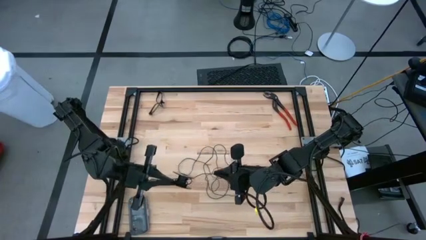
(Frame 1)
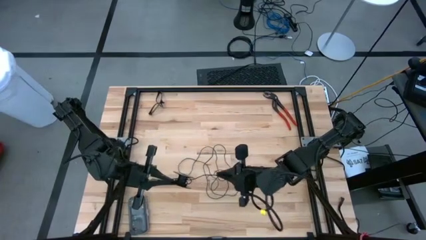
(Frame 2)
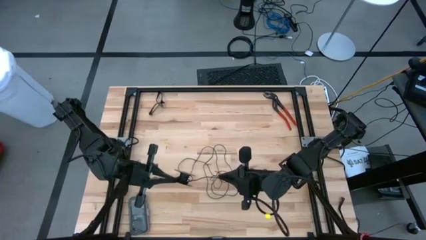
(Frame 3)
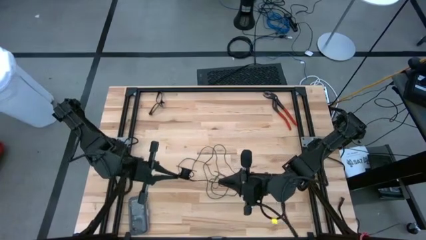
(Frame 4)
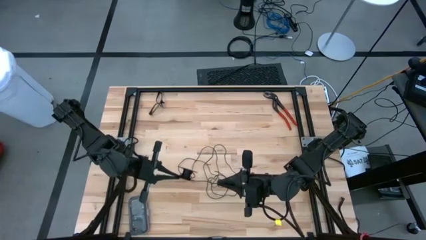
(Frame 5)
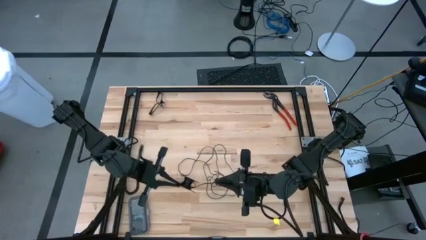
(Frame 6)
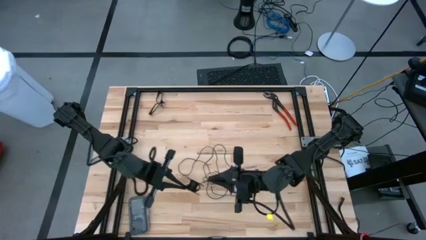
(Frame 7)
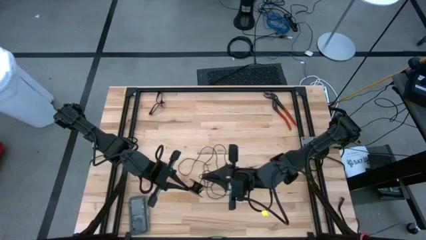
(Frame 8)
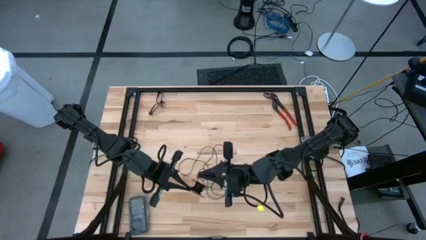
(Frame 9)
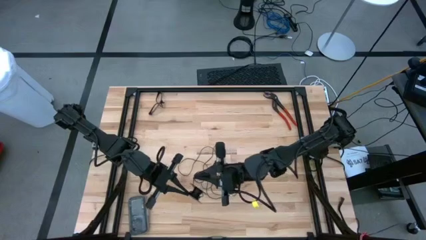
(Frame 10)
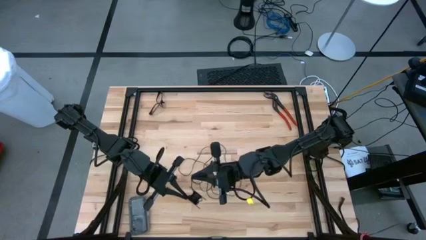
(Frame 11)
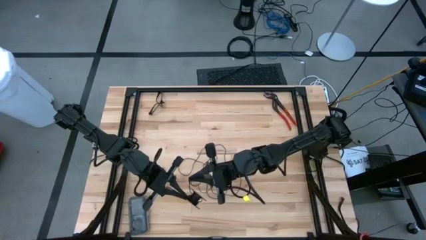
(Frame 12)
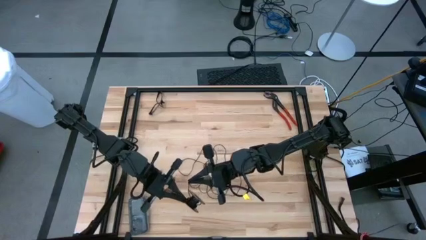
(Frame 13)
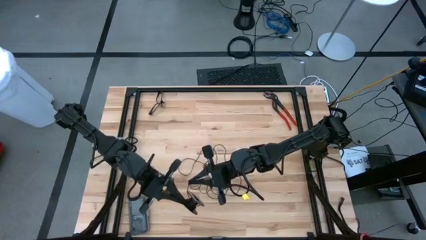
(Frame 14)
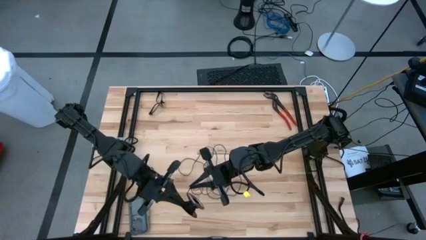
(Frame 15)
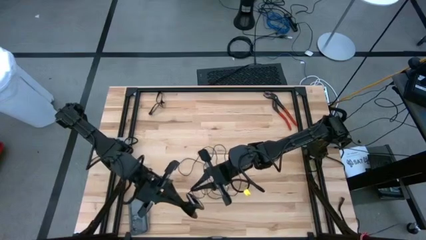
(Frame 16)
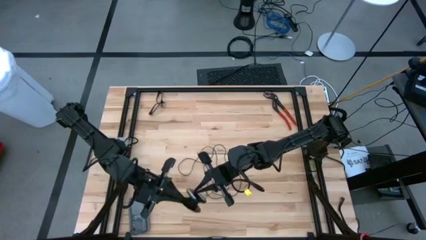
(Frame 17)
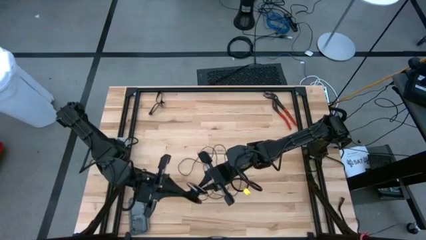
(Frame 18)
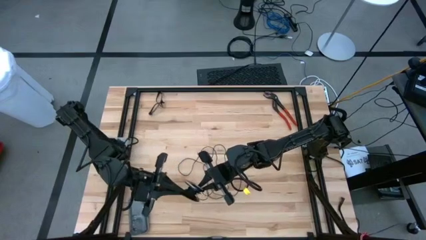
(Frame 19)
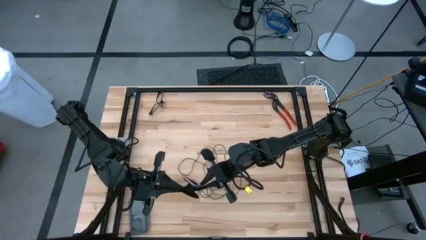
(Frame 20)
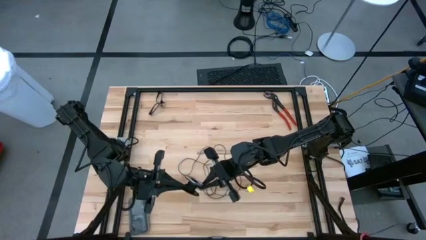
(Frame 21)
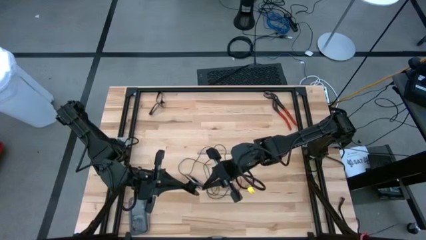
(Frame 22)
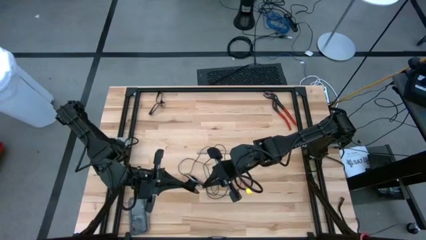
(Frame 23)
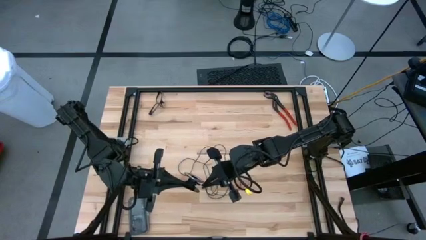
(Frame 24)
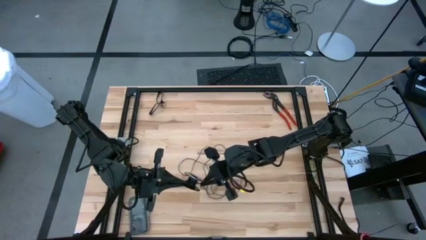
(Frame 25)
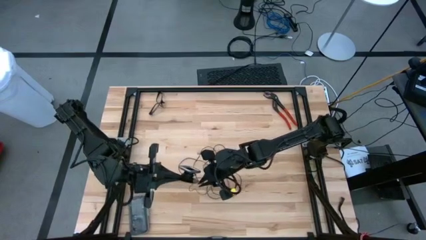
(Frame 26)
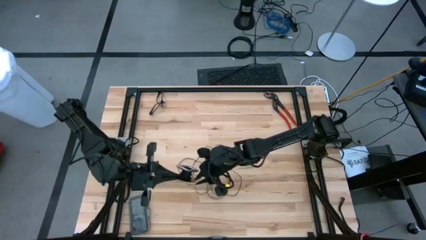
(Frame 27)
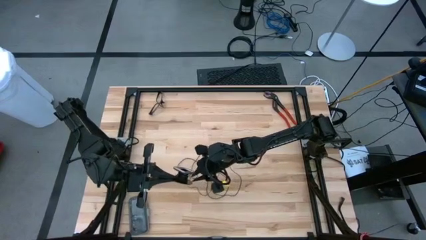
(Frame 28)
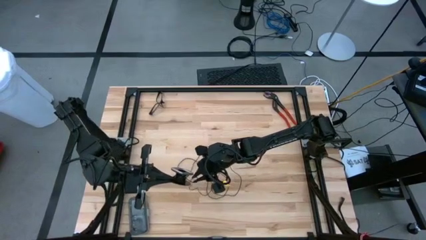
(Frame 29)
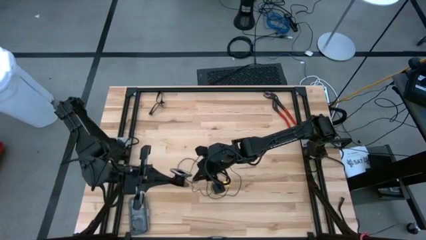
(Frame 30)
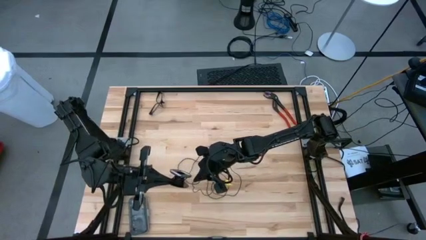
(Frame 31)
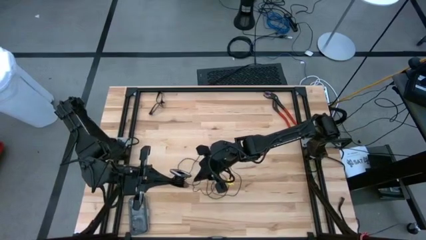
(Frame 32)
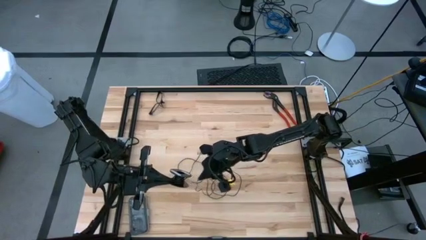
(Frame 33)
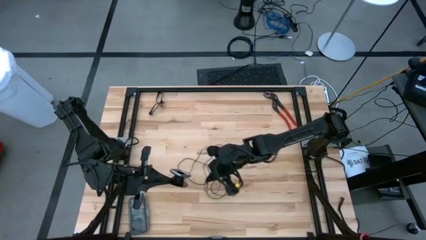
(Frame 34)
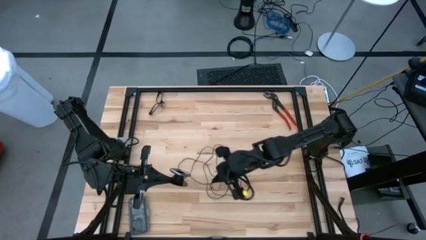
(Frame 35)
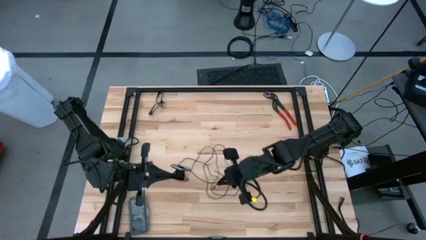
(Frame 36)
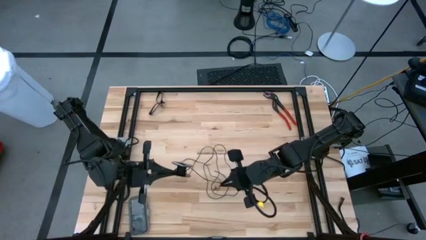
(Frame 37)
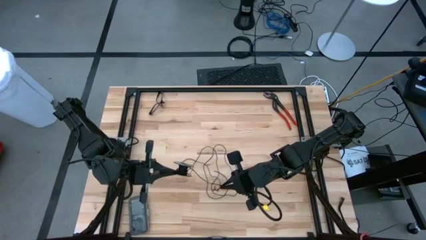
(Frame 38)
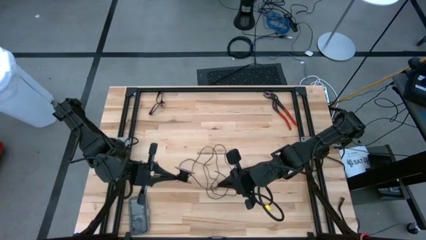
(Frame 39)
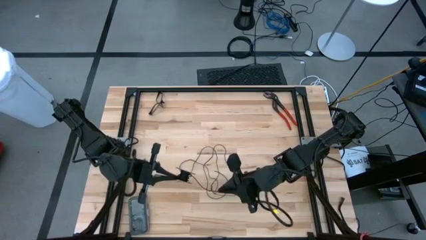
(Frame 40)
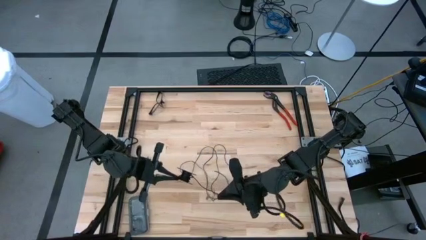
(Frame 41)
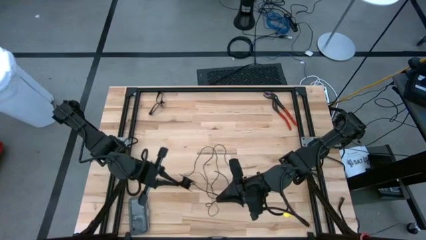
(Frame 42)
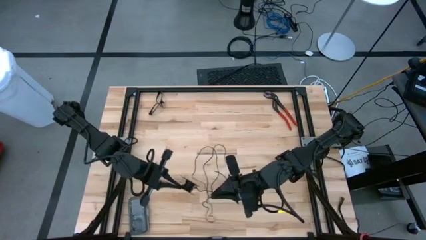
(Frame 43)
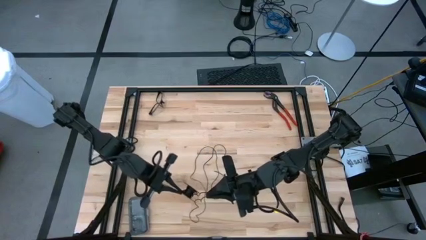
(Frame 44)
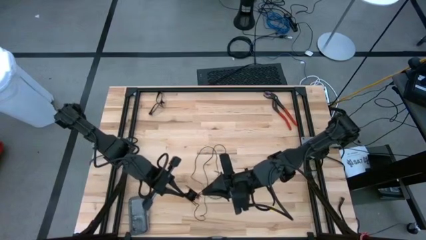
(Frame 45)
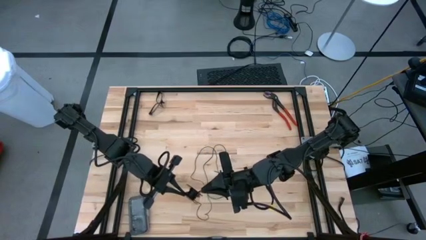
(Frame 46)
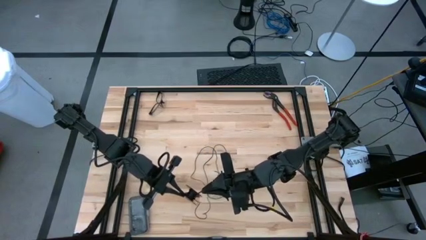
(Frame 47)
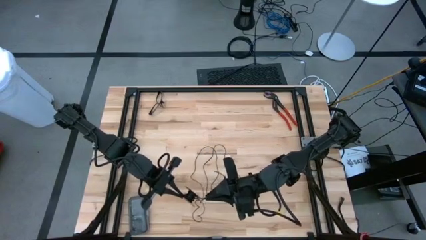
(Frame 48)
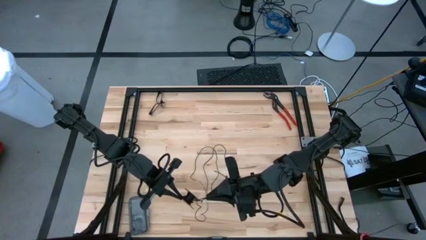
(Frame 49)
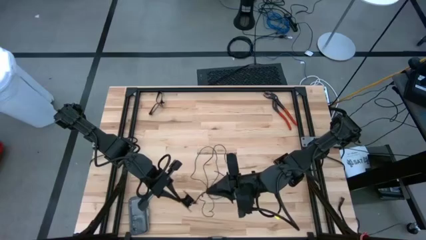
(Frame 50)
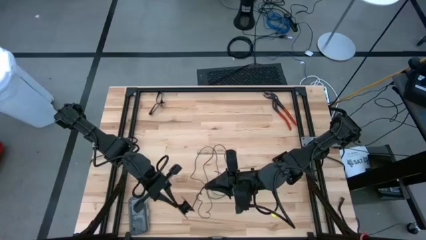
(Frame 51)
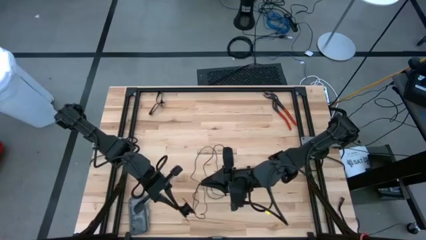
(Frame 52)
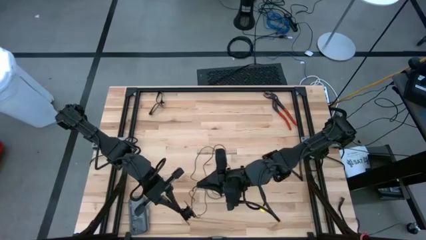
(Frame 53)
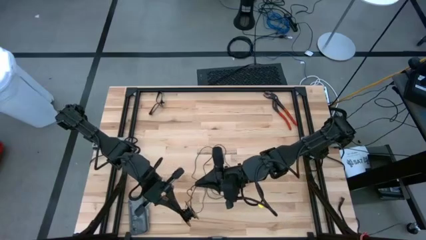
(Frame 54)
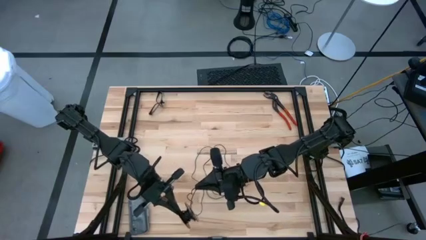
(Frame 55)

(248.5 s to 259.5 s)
Task: Coil cords
Coil the black wire onto the spool

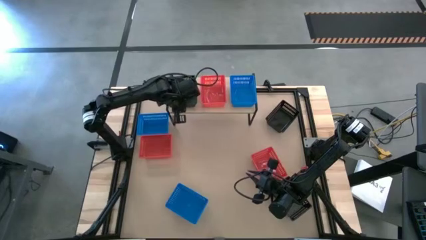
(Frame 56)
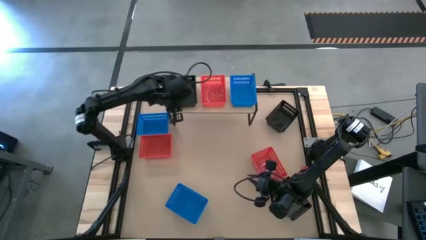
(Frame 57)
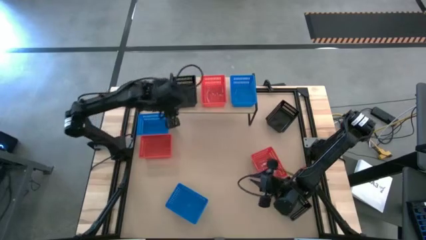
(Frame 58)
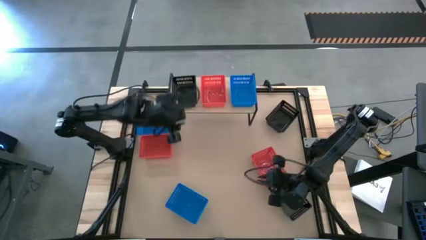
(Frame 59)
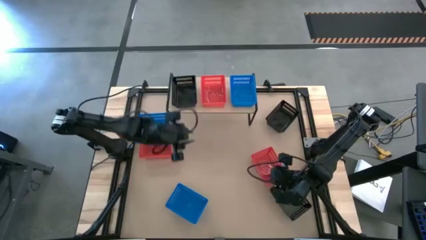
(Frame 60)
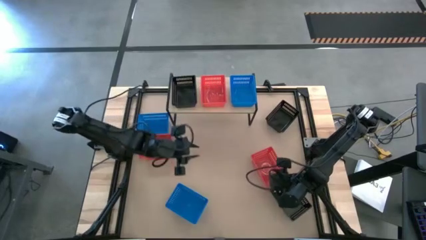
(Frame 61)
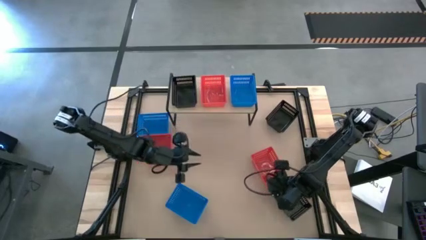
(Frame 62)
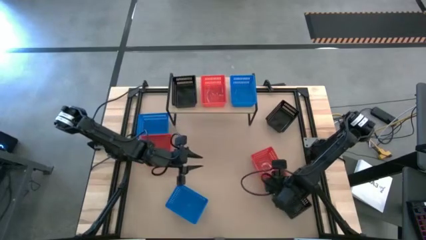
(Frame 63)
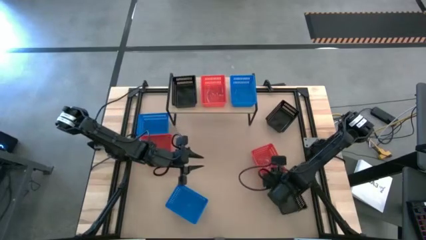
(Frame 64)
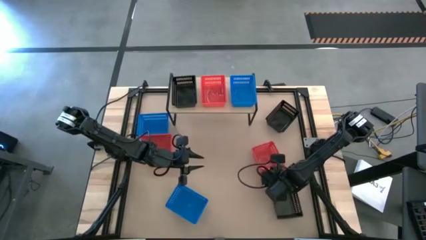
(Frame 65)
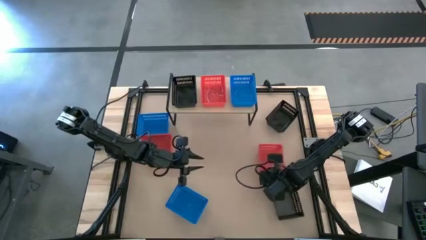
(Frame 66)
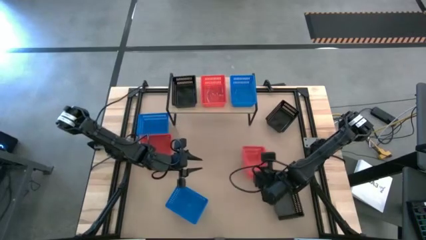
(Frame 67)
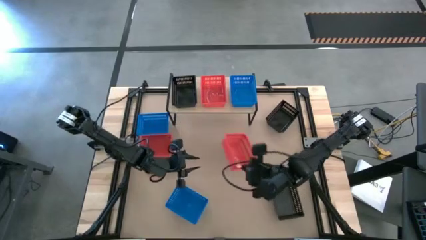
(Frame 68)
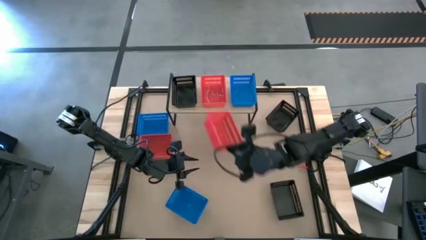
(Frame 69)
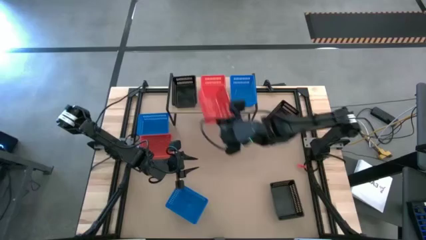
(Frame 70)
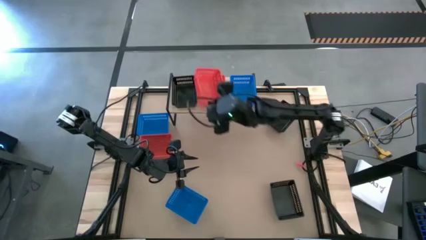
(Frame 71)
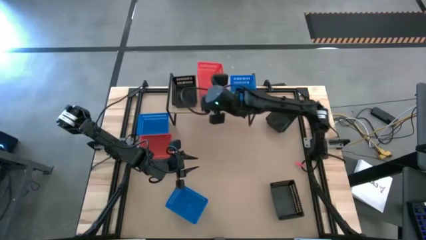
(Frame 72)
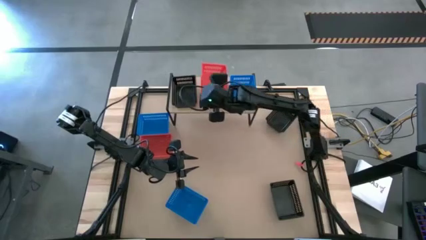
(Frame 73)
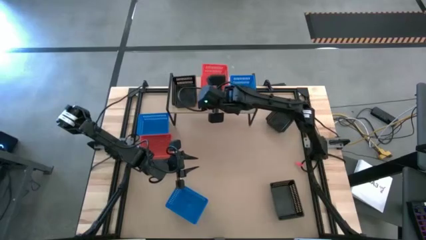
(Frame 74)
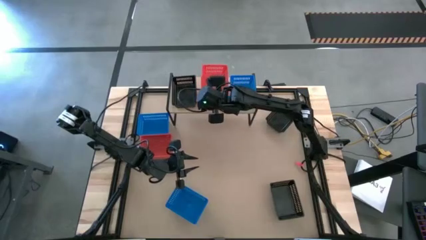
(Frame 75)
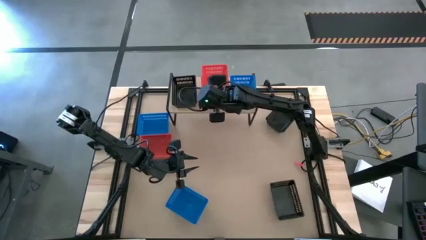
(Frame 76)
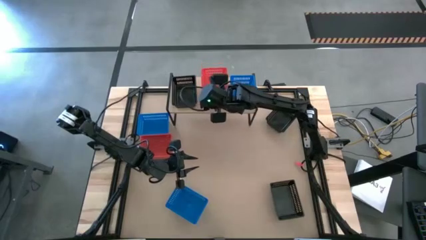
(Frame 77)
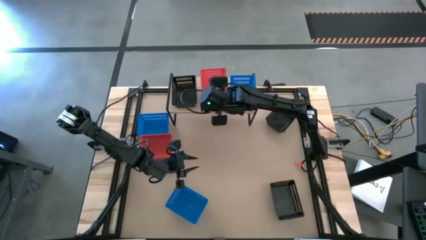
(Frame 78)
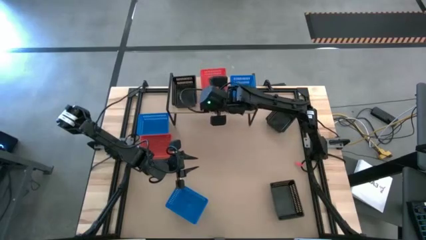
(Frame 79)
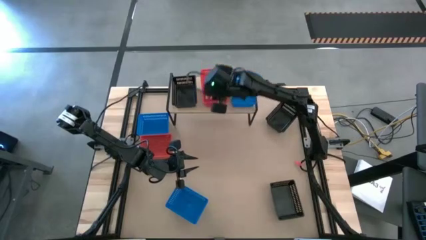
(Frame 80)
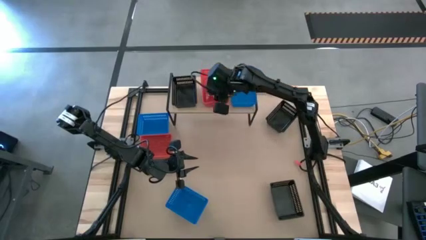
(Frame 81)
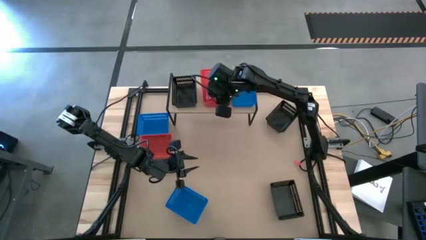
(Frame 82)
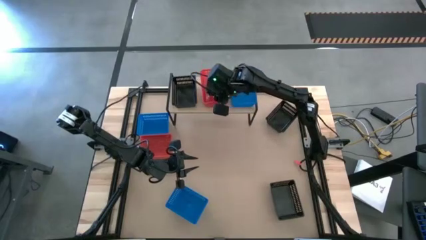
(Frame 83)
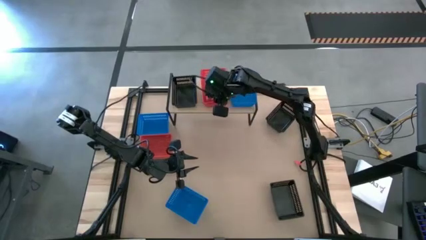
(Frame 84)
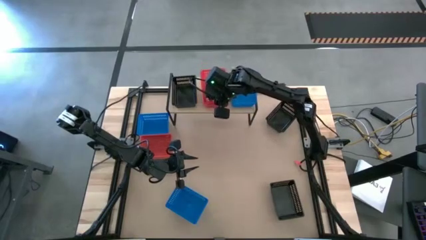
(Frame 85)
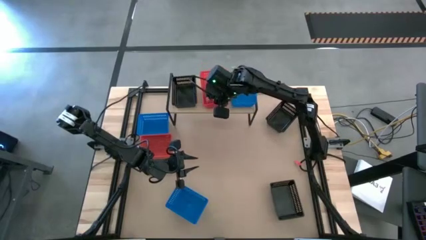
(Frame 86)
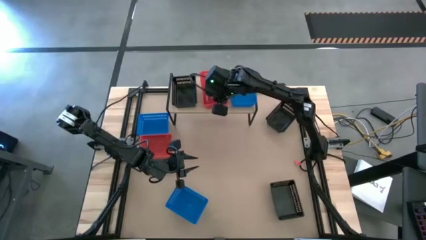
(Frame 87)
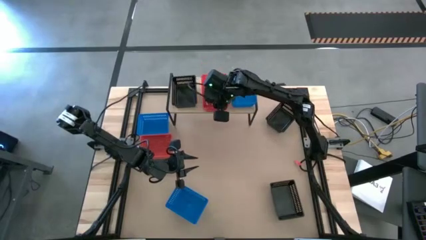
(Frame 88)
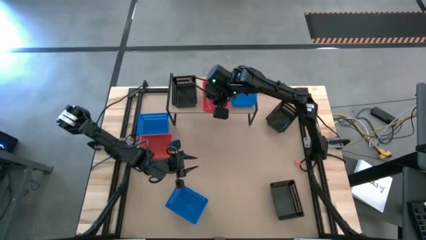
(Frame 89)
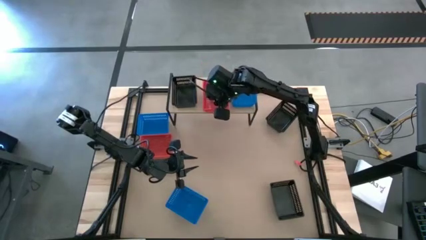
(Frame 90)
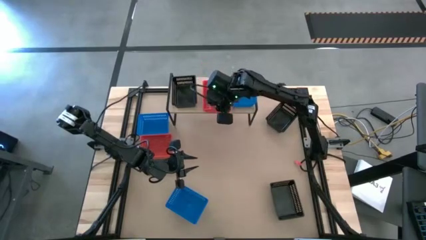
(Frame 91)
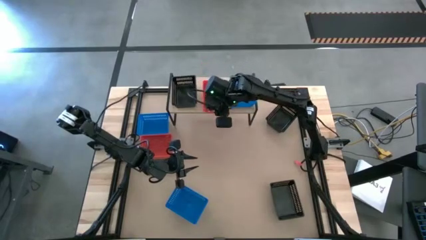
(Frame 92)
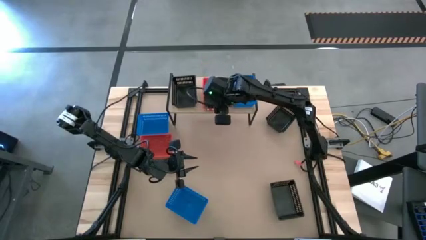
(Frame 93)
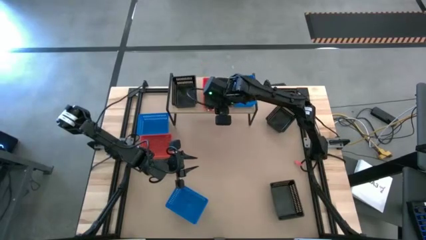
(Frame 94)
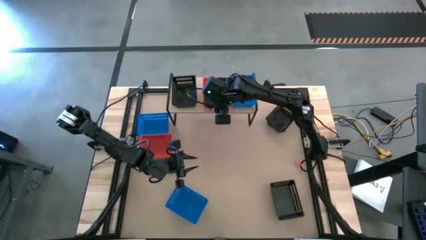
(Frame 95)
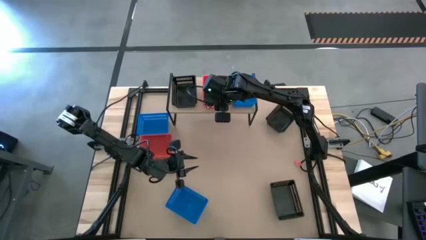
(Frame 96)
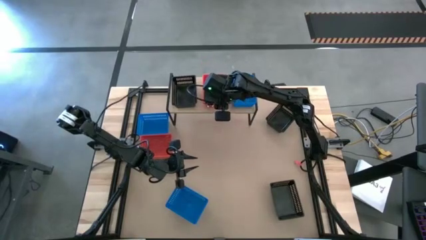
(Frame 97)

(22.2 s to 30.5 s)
Task: Stack baskets on shelf by color
Stack the right red bin on the red bin on the shelf
